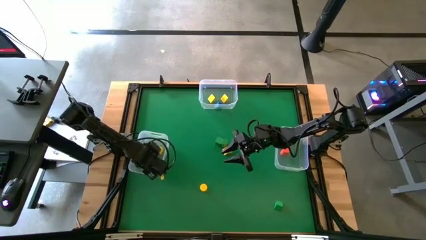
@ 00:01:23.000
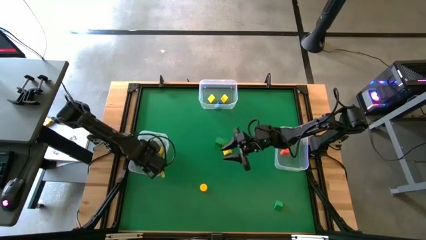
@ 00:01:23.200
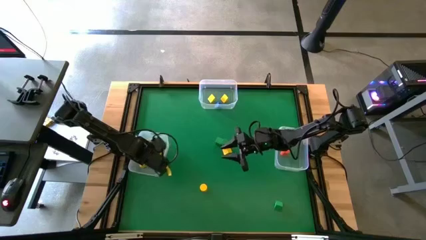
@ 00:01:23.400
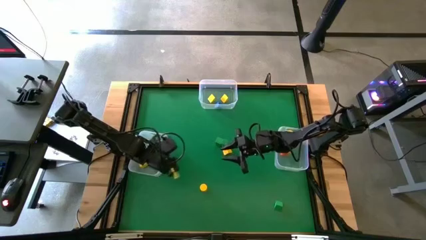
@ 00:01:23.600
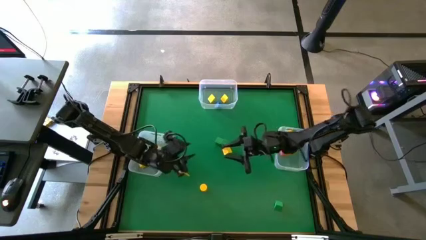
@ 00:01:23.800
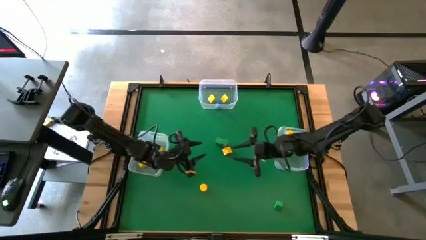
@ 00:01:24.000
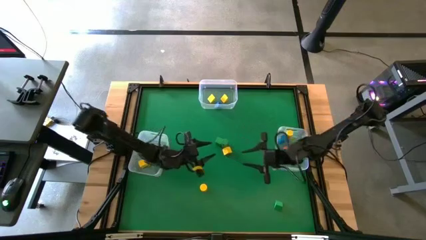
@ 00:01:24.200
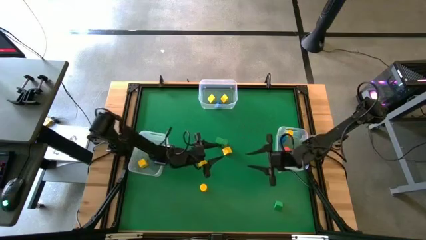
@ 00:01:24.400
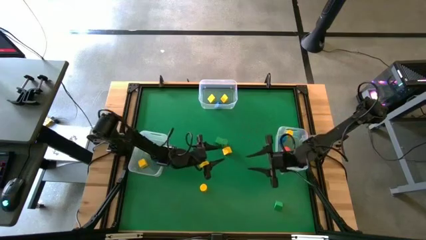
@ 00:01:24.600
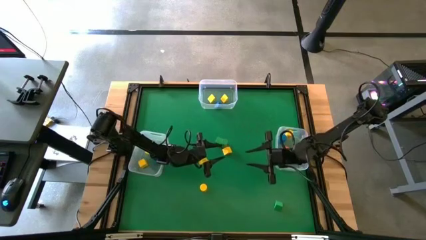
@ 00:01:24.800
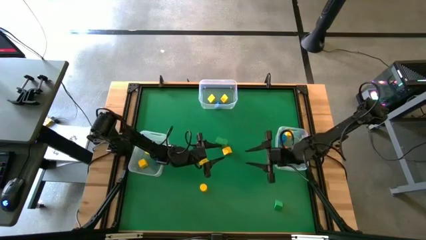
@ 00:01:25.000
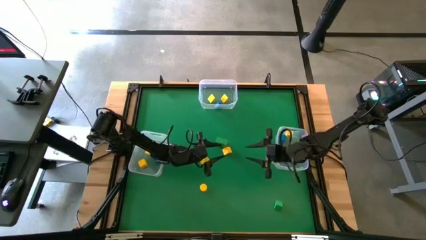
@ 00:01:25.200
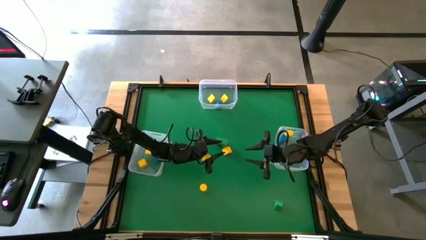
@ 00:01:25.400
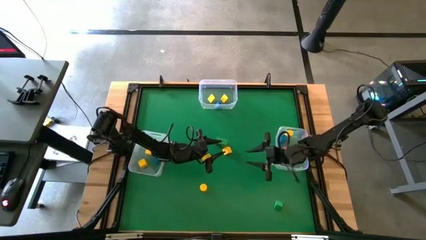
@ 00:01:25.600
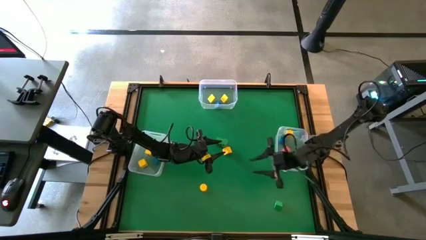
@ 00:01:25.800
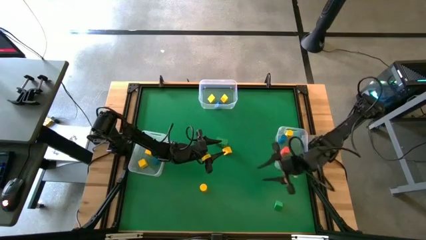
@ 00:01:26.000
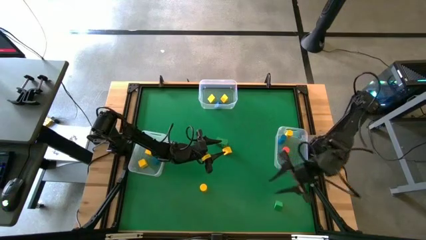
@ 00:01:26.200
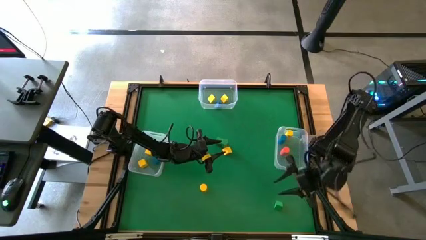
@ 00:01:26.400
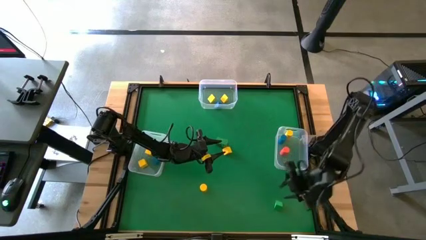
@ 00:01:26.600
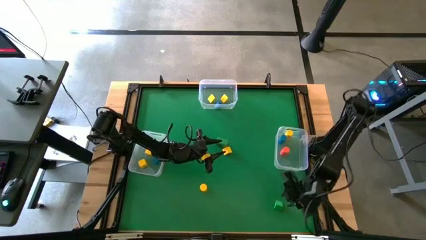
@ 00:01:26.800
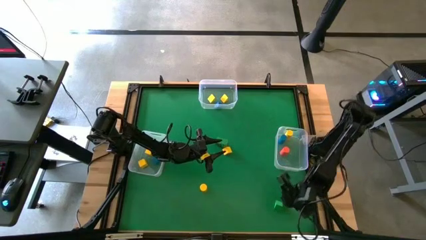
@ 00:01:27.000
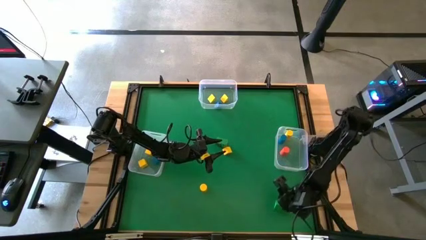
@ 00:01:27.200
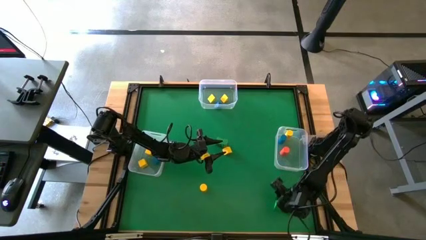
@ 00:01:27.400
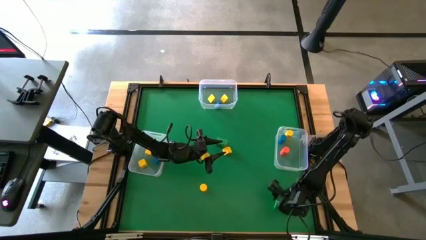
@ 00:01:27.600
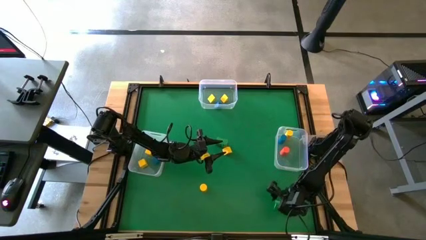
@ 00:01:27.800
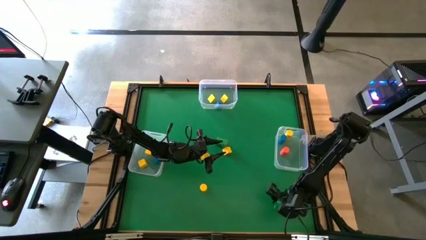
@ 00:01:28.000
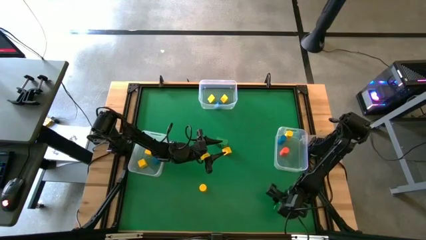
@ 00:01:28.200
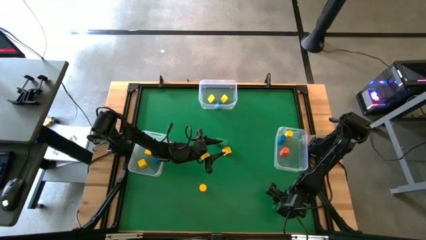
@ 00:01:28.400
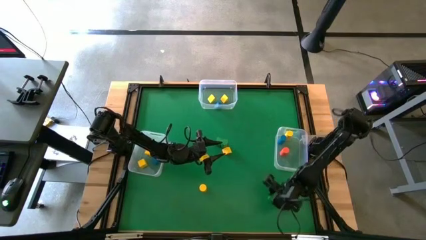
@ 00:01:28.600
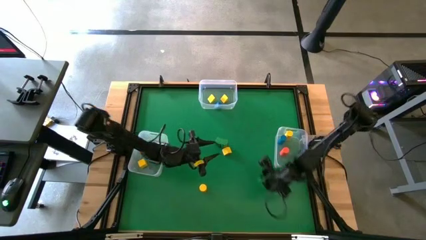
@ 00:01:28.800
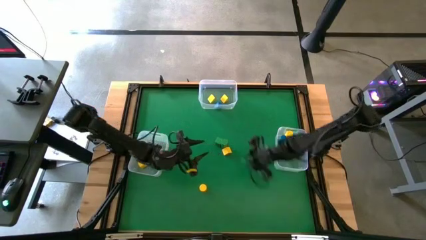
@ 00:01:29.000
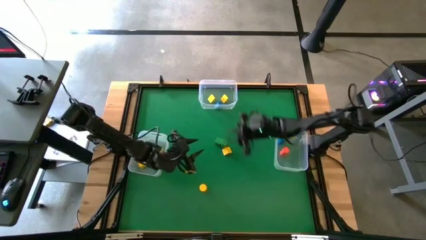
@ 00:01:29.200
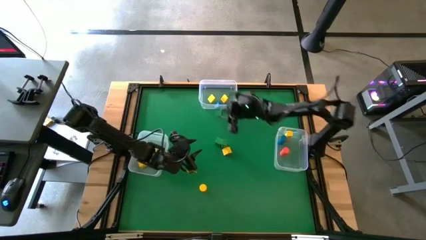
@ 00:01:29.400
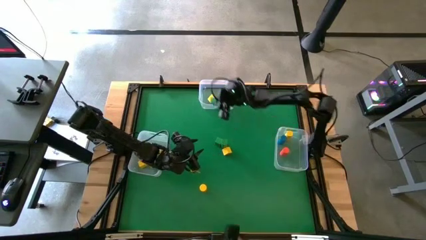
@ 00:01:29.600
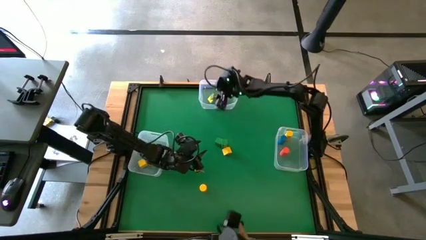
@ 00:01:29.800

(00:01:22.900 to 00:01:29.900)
Task: Sort blocks by size
Put the green triangle block into the top transparent bin

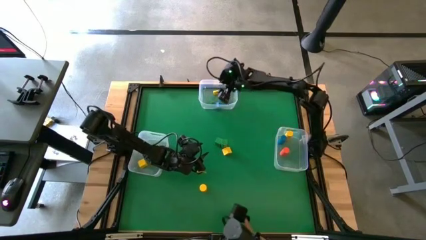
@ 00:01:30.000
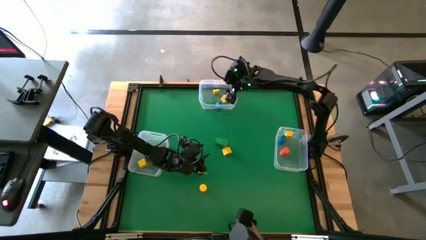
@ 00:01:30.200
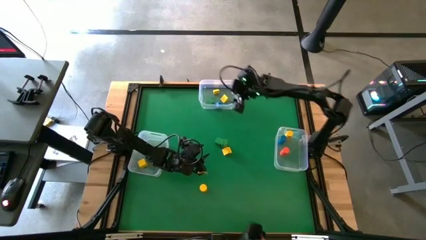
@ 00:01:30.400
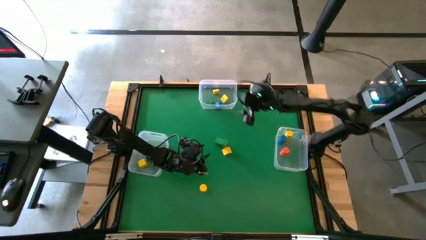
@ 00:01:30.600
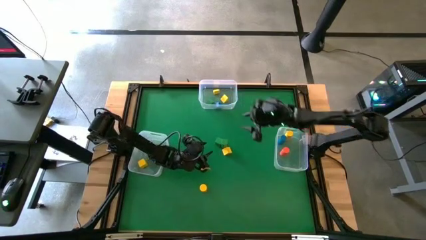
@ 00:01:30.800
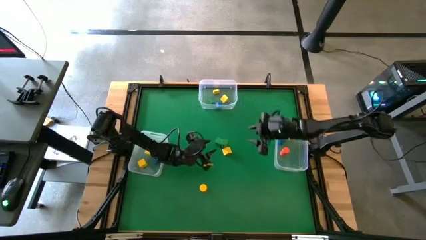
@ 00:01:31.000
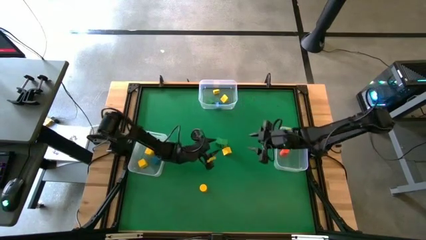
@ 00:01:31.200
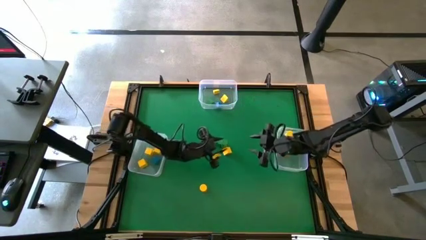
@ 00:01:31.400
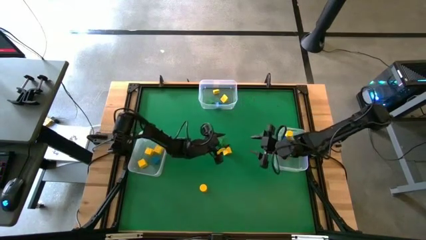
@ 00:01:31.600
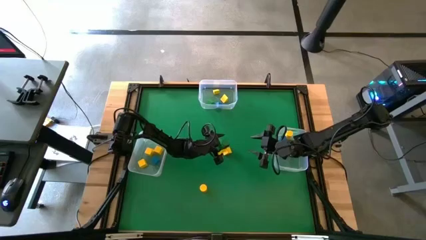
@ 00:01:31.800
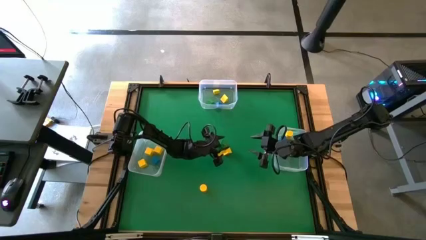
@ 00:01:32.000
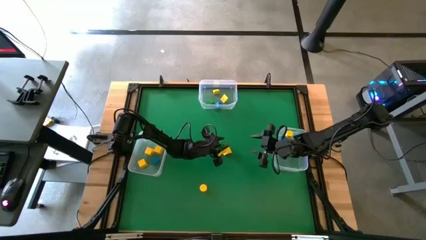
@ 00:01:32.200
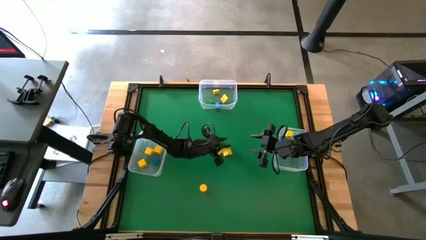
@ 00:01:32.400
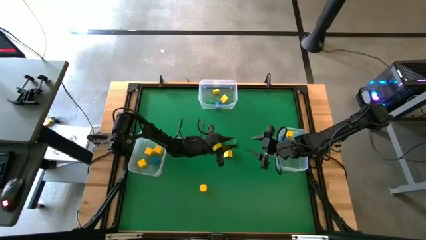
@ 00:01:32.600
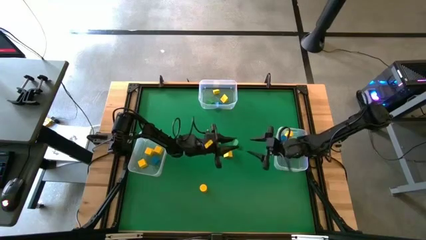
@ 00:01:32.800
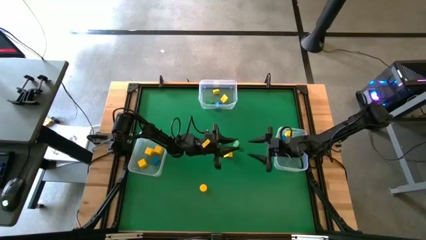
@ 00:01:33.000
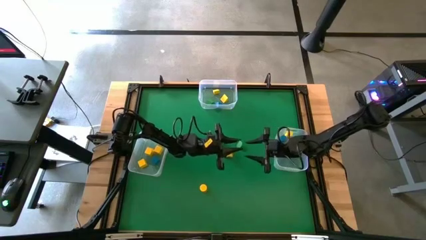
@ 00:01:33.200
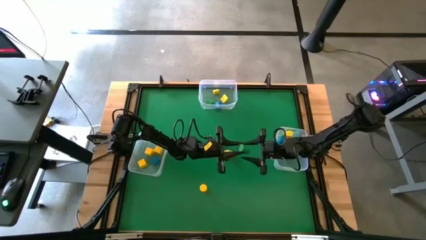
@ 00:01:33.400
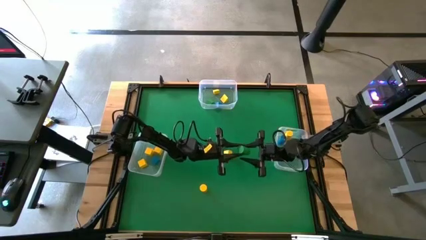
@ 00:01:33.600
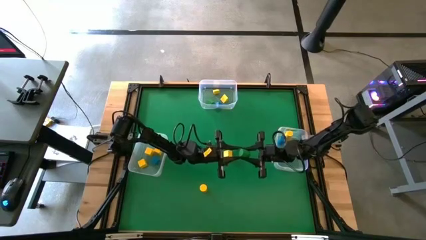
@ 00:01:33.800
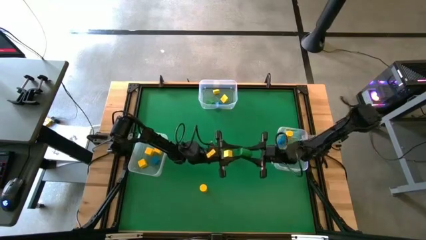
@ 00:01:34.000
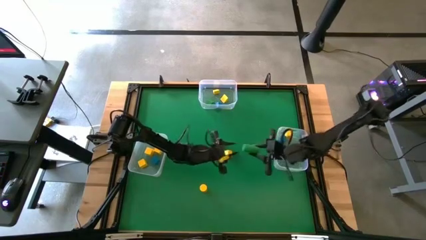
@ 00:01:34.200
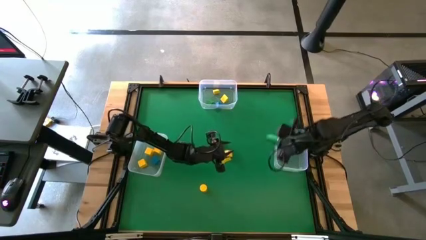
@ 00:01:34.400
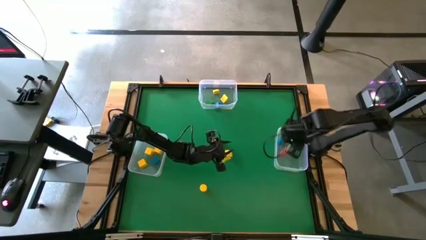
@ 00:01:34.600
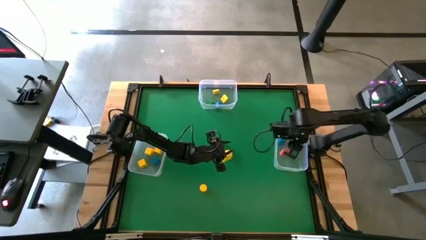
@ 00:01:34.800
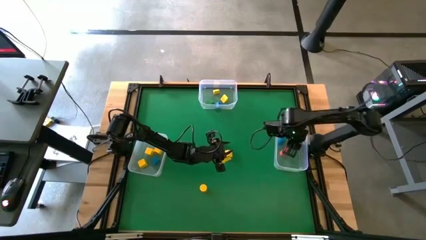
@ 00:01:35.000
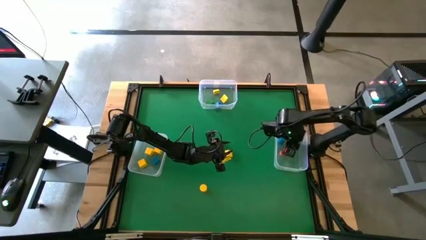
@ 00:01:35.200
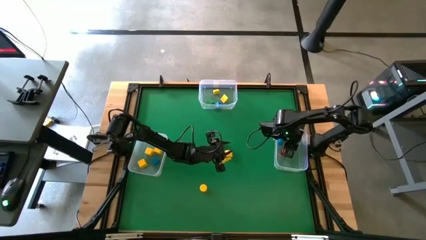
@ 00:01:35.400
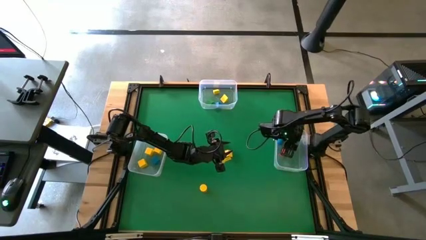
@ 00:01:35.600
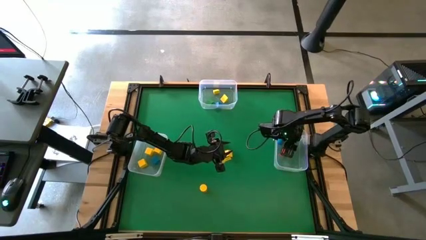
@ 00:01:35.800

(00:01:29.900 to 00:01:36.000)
Put the green cylindrical block into the right transparent bin

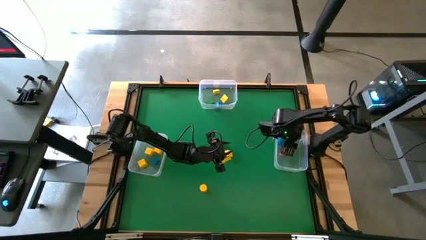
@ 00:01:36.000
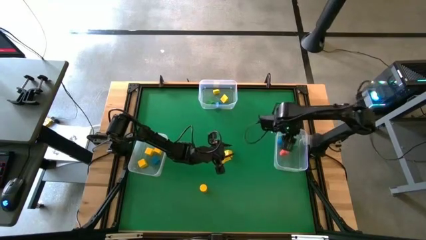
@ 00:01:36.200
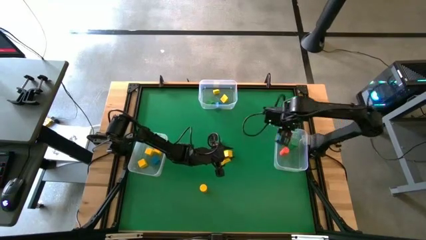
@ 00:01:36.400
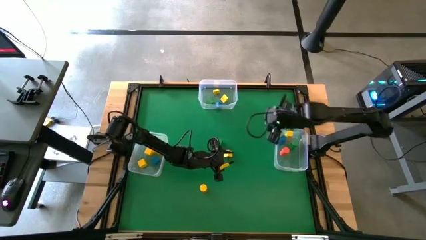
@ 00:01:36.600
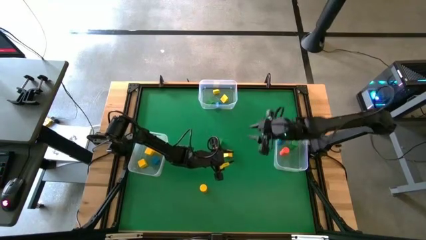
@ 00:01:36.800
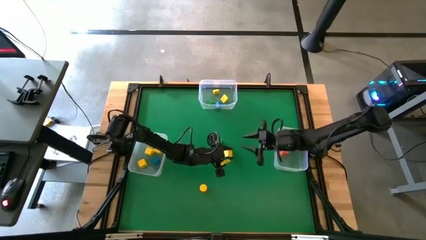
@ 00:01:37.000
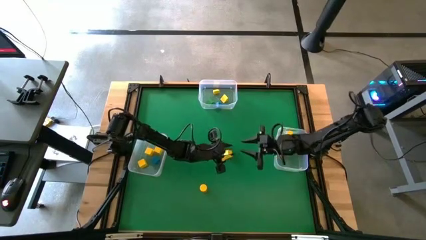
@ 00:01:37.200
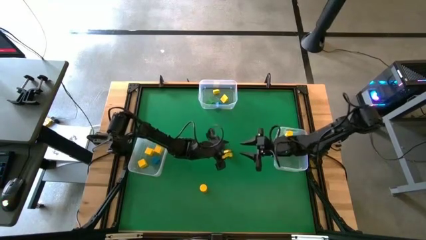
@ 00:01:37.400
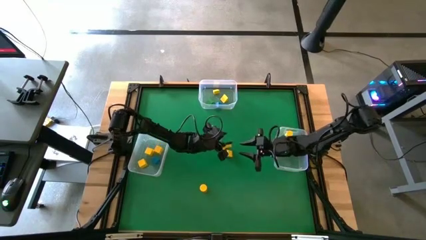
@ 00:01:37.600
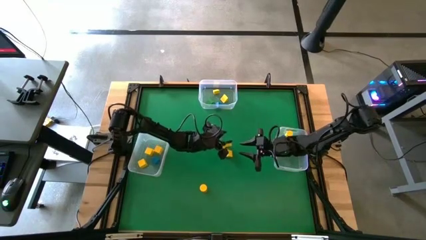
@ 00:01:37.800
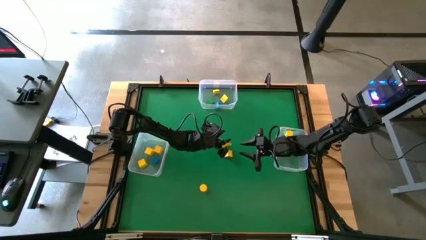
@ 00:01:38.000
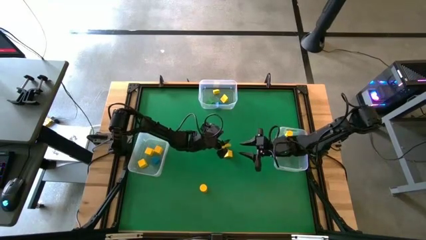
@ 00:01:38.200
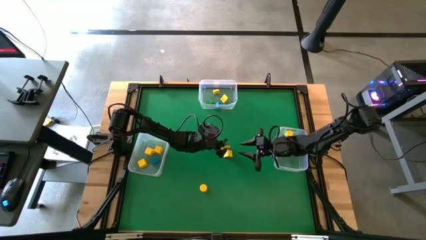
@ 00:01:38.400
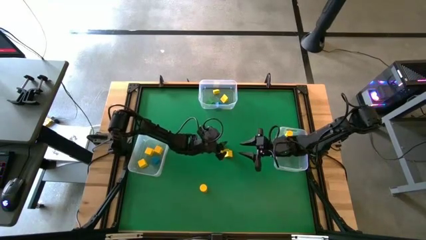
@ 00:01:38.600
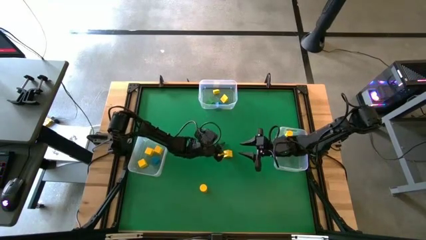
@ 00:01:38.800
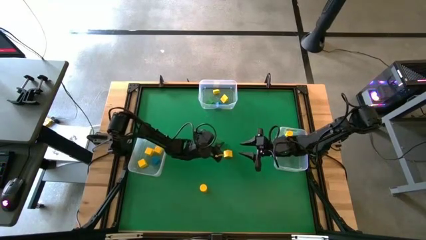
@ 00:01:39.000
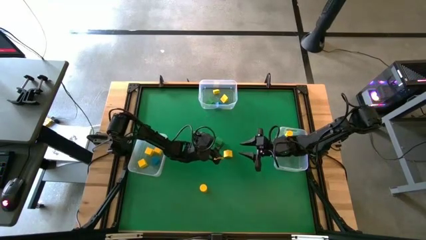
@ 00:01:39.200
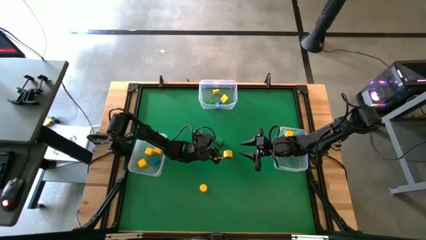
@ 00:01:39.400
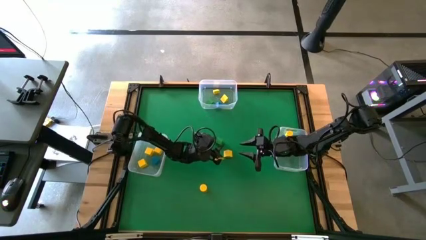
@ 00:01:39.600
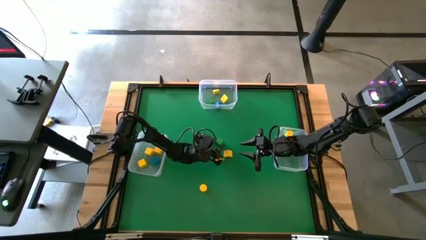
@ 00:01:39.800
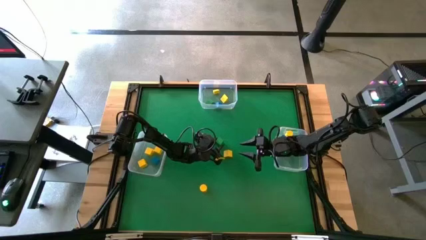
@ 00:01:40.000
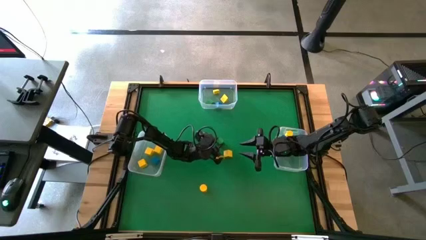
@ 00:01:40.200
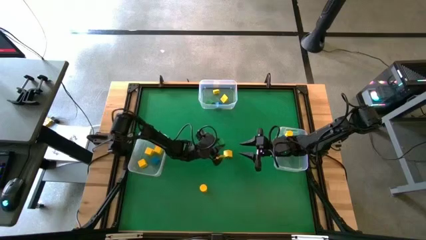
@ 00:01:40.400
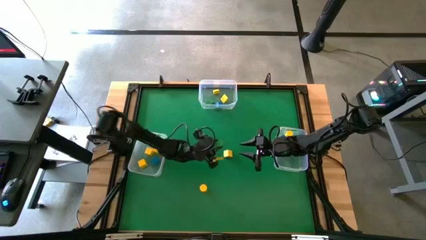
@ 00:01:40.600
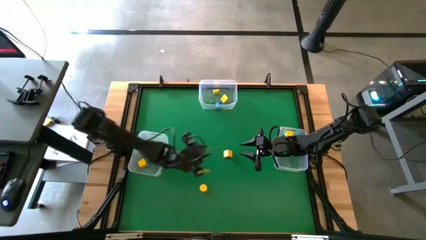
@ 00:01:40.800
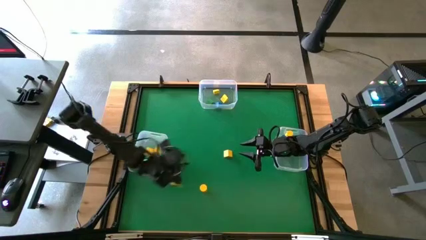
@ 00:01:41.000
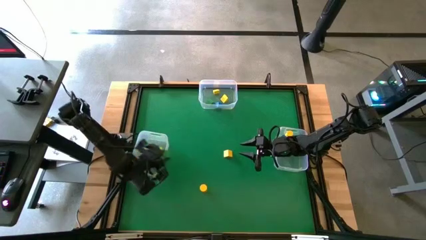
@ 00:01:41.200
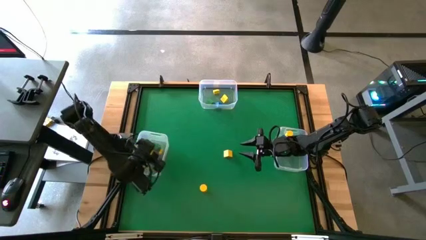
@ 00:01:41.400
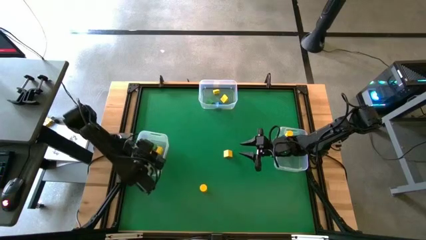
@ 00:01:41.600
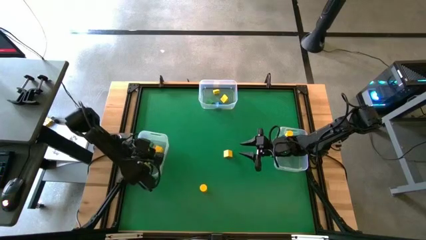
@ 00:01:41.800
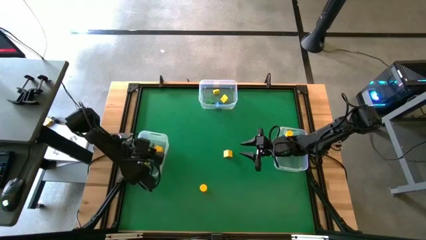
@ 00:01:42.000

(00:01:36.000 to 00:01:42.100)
Put the green square block into the left transparent bin
